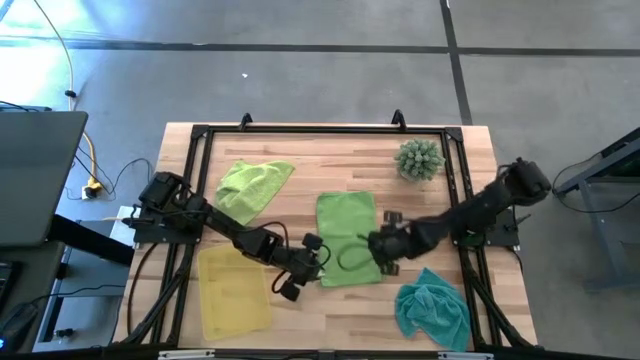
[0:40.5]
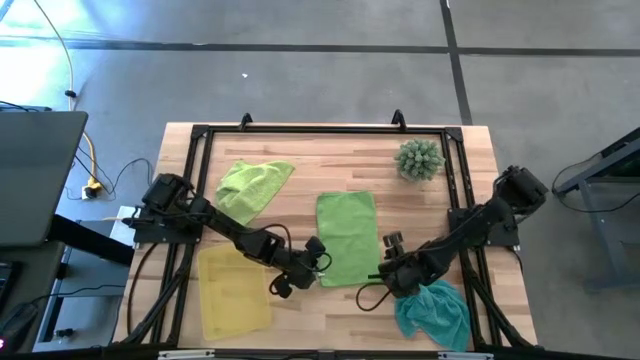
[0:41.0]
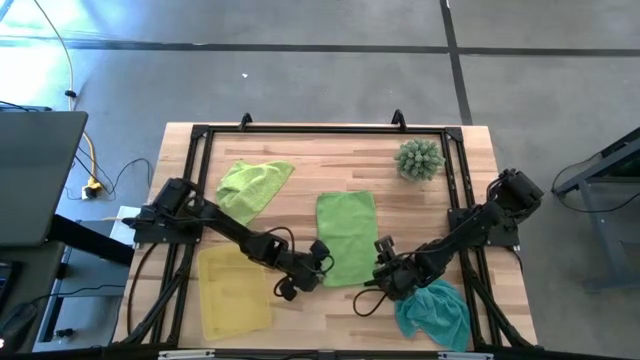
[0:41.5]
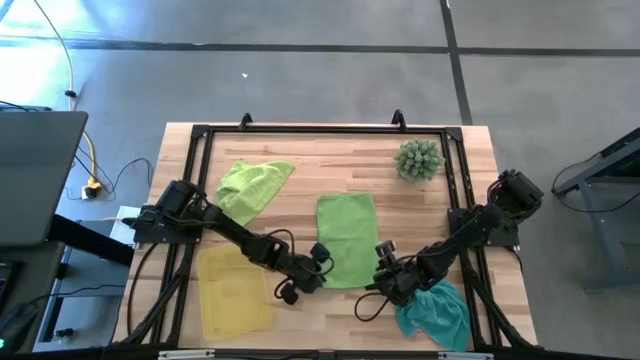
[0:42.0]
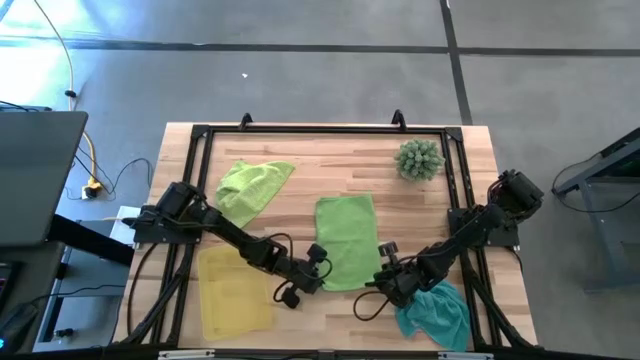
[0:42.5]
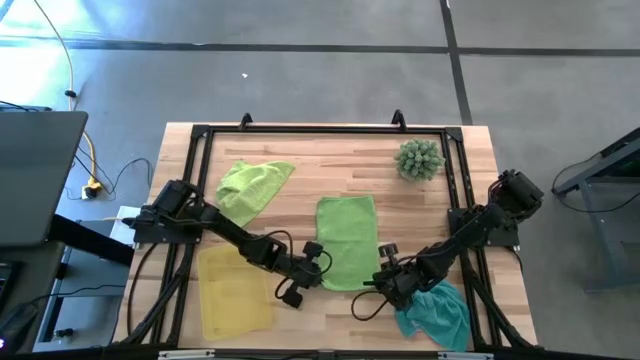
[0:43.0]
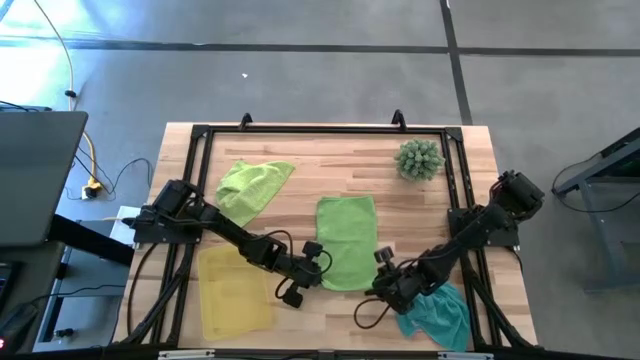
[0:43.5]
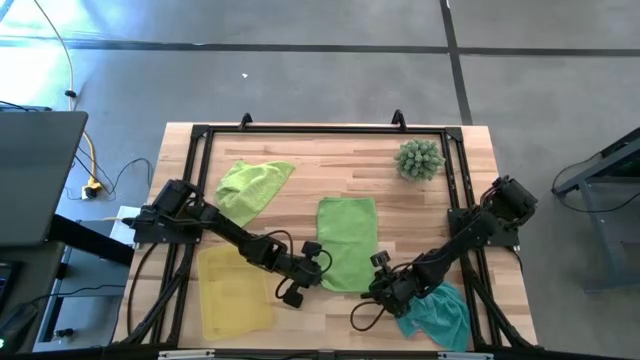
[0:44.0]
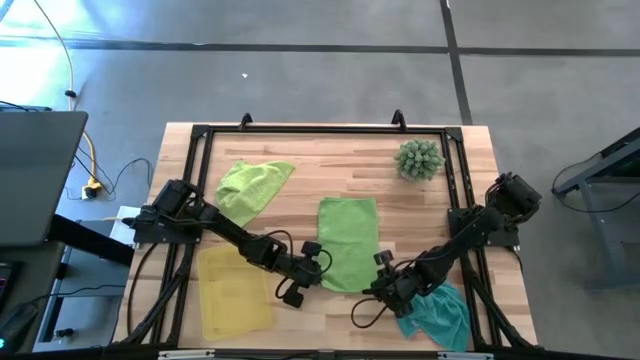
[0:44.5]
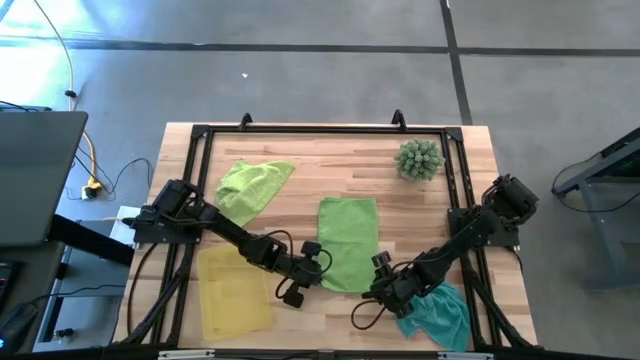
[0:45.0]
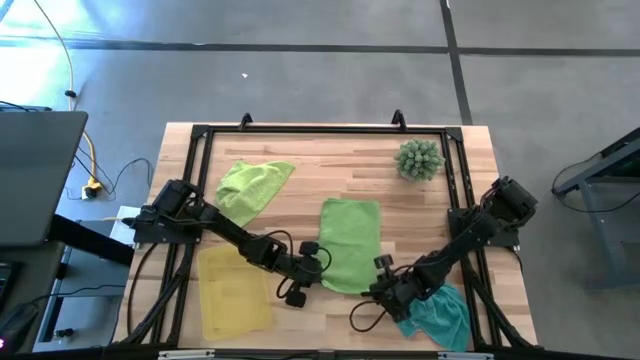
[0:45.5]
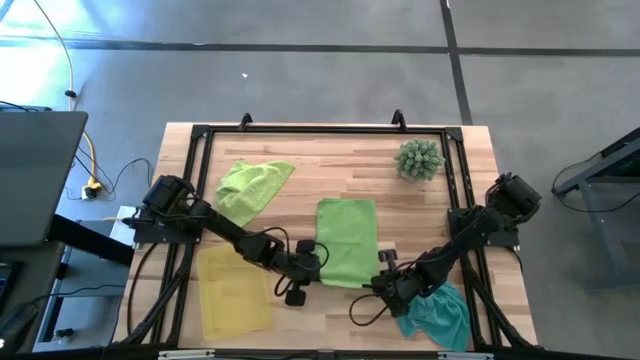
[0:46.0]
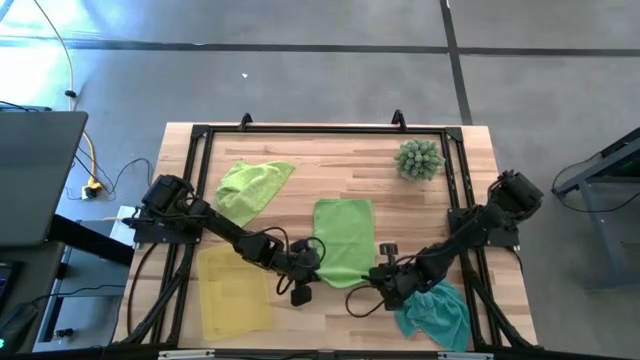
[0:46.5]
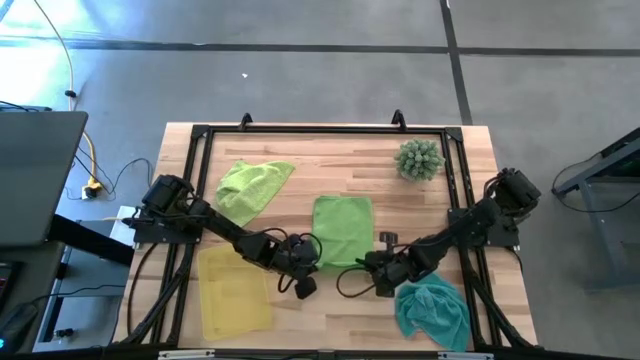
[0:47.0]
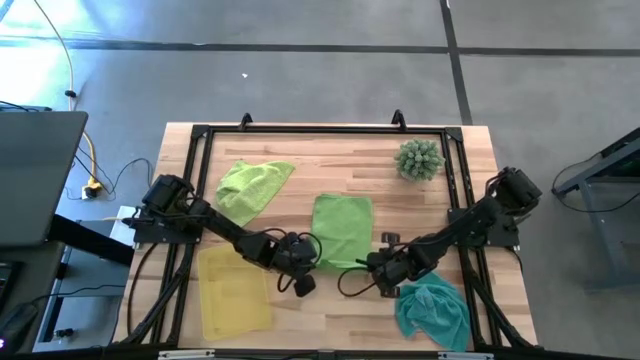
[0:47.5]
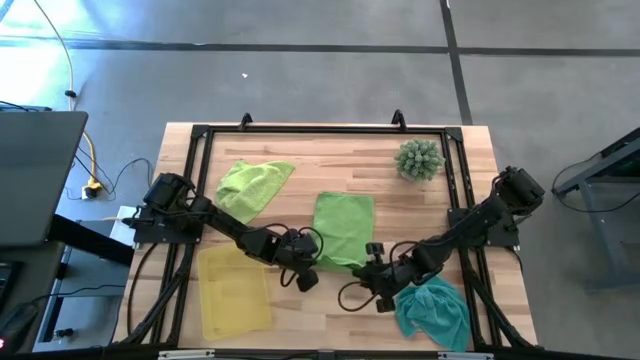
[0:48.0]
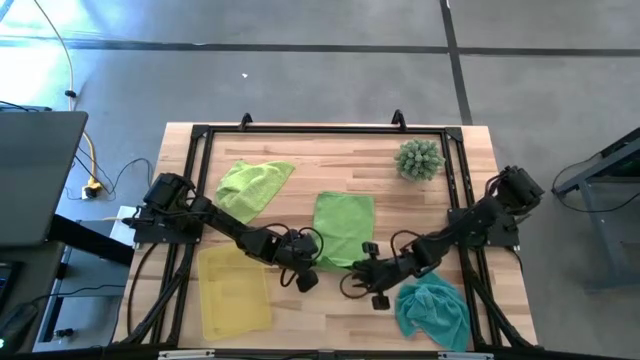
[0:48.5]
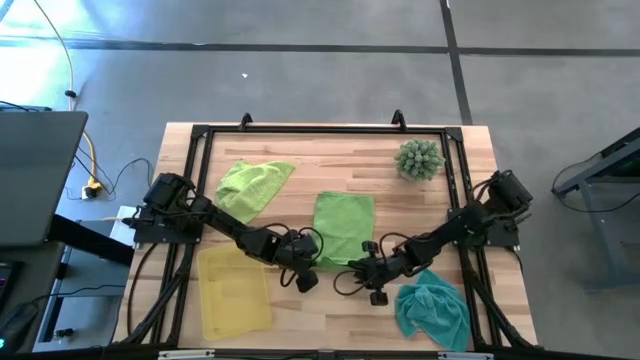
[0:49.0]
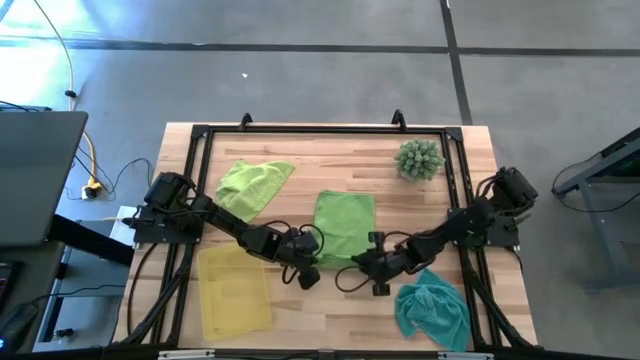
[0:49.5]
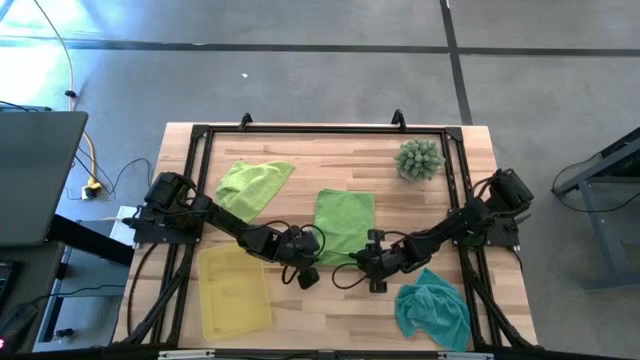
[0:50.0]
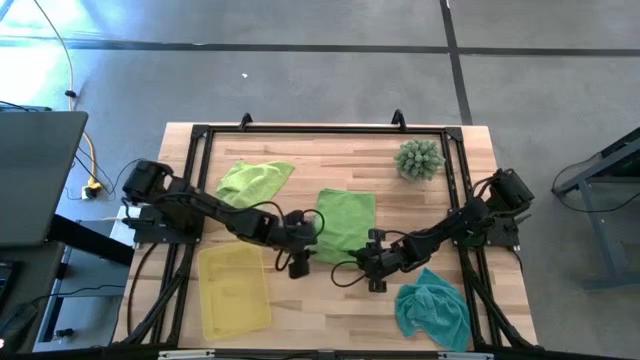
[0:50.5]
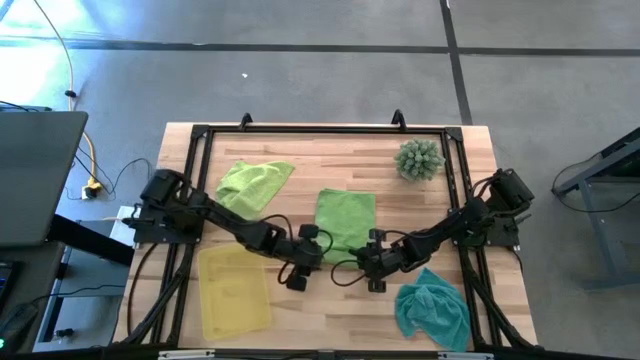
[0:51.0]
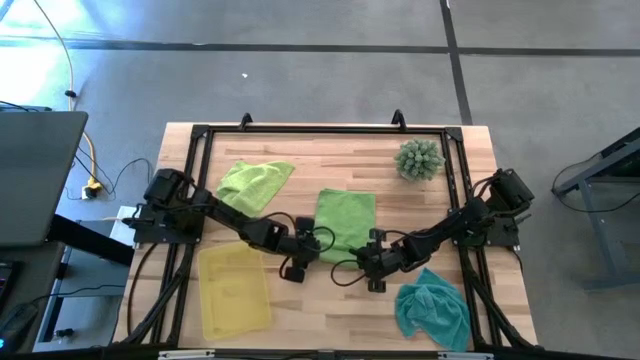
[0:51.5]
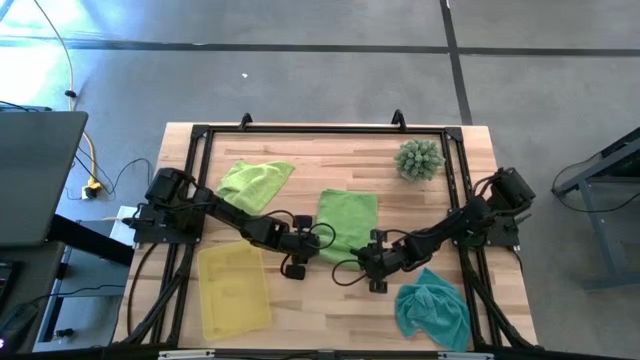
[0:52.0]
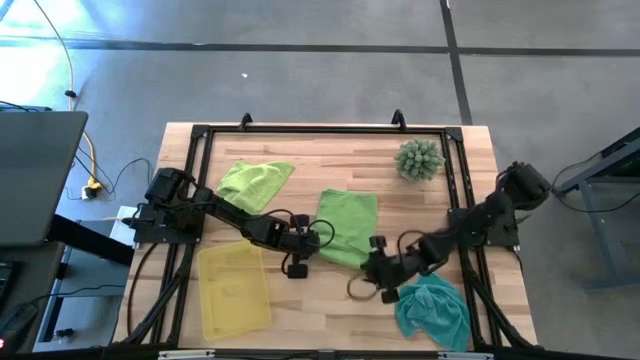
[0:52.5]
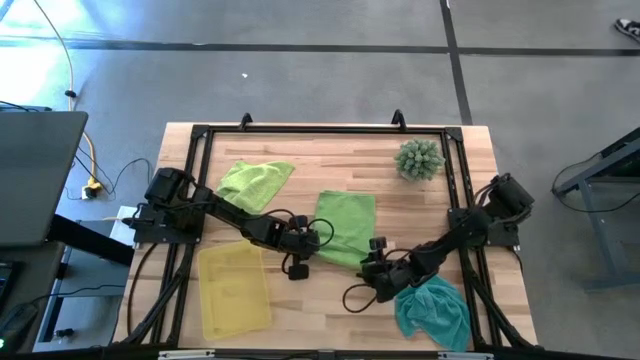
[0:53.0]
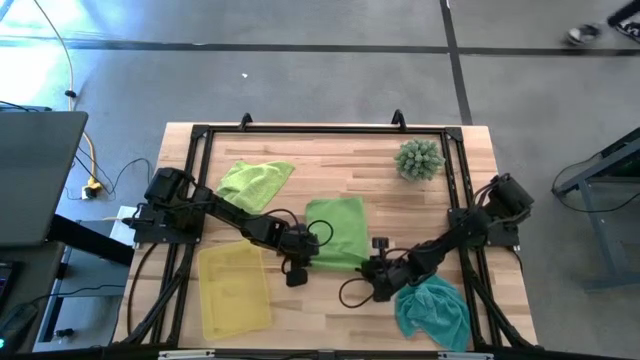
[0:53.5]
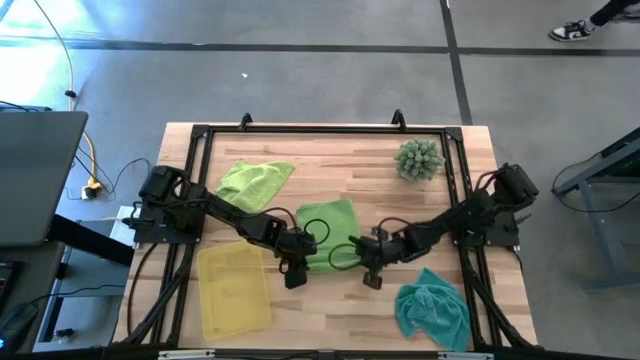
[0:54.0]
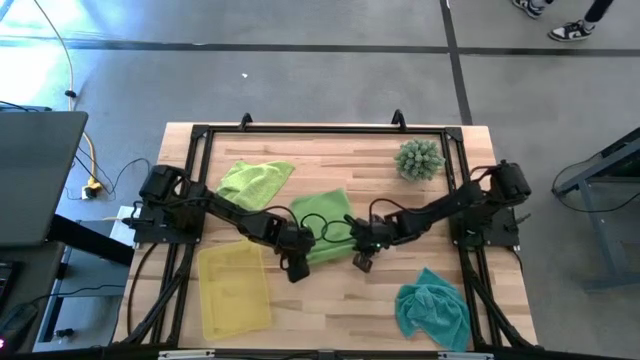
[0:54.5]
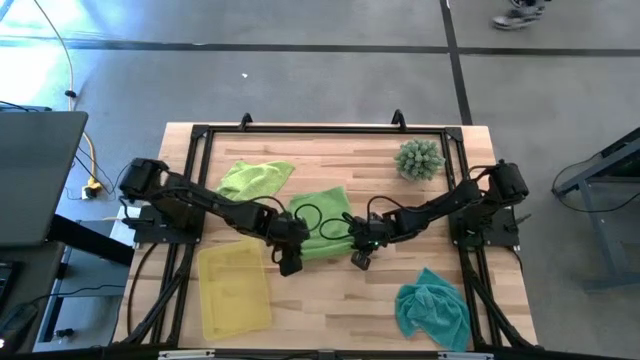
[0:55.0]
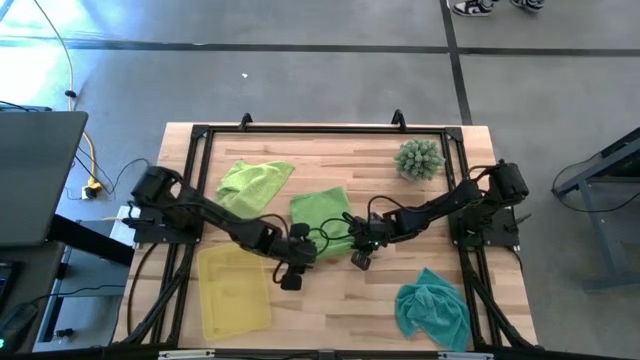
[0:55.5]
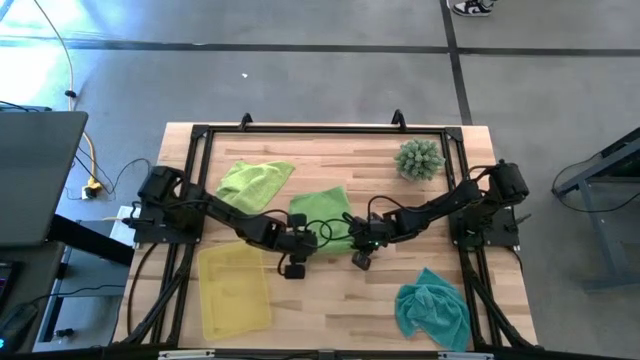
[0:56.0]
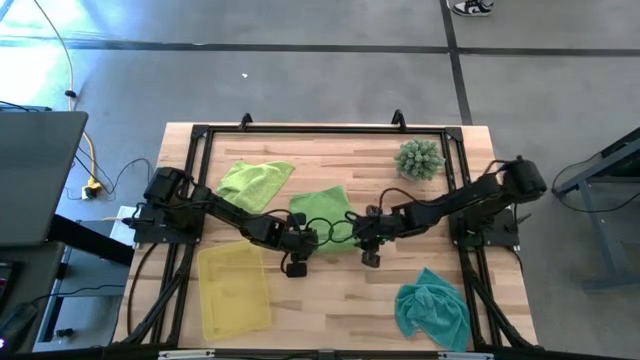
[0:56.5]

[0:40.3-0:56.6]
Task: Roll microfiber towels into tight, uniform cylinder then place into a basket
Roll the green microfiber towel

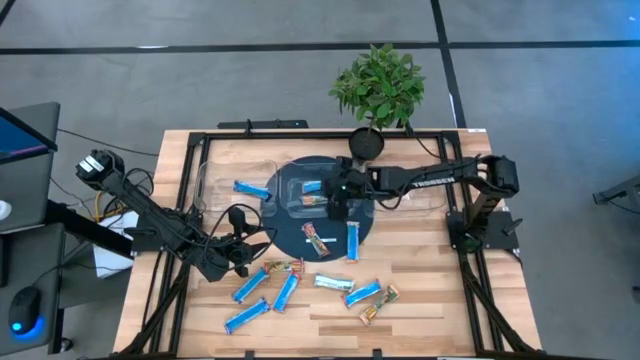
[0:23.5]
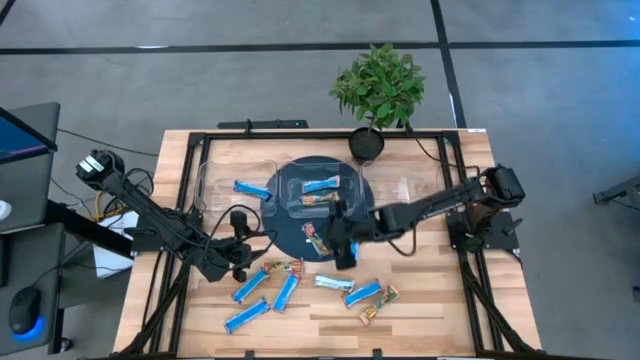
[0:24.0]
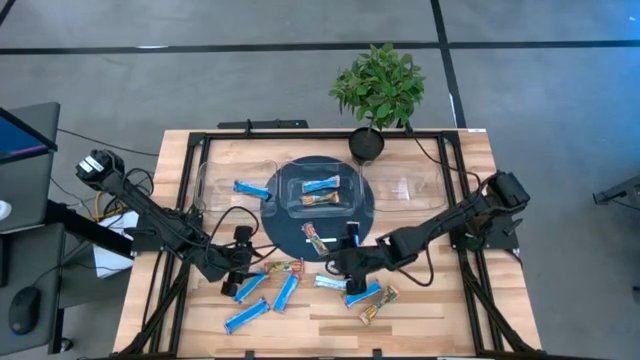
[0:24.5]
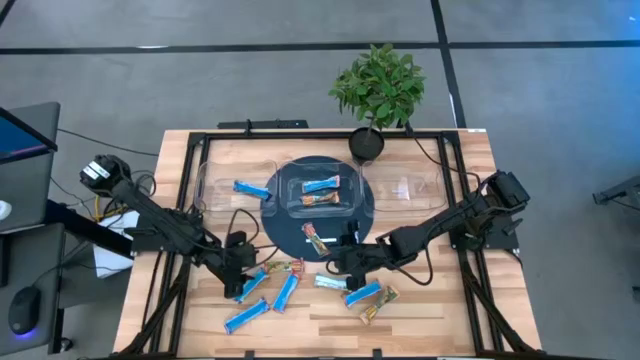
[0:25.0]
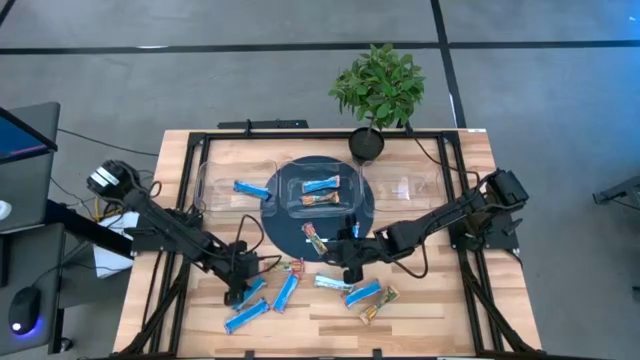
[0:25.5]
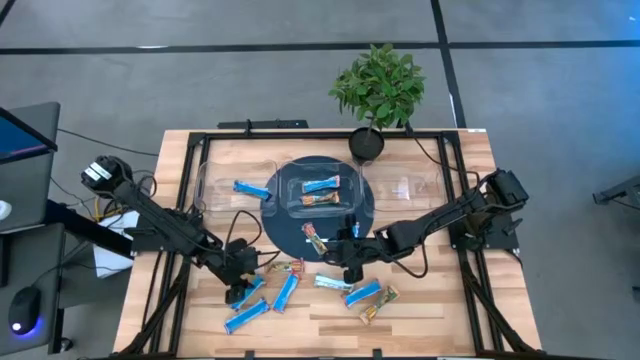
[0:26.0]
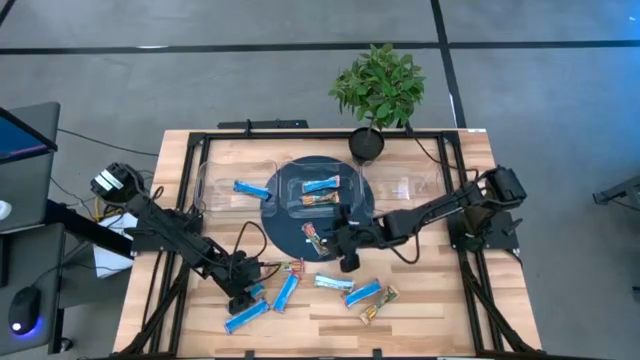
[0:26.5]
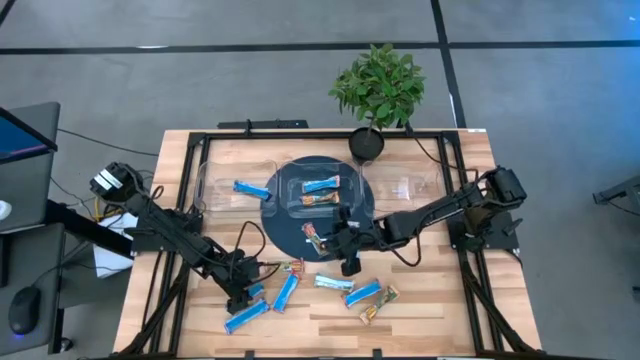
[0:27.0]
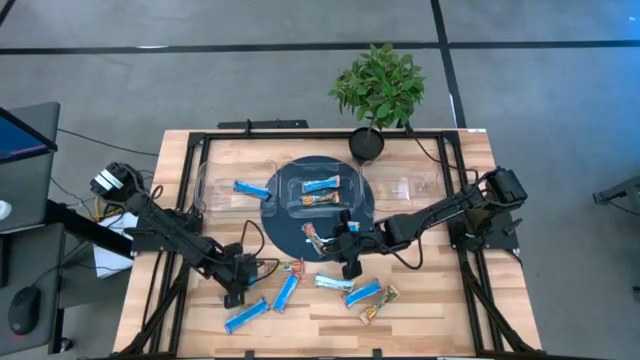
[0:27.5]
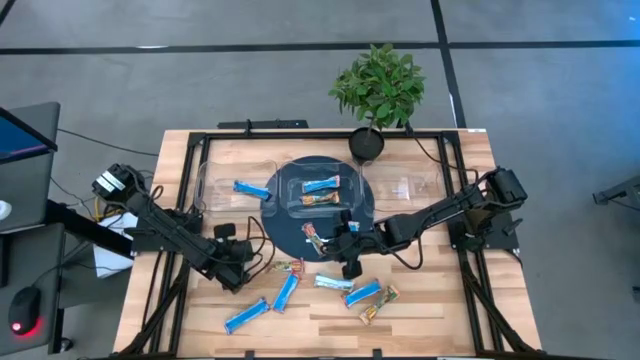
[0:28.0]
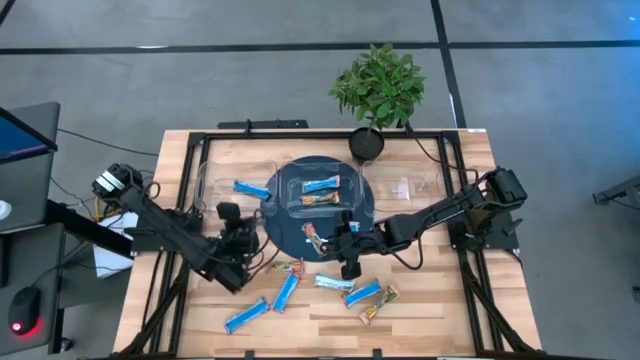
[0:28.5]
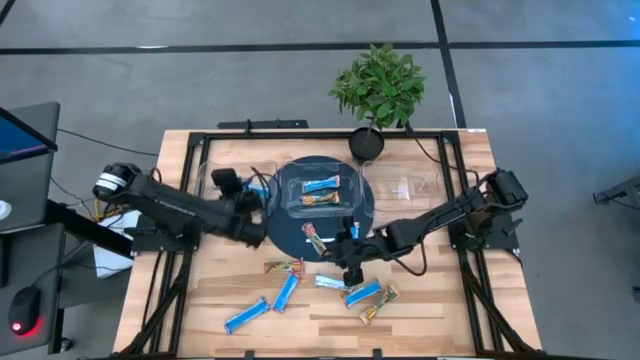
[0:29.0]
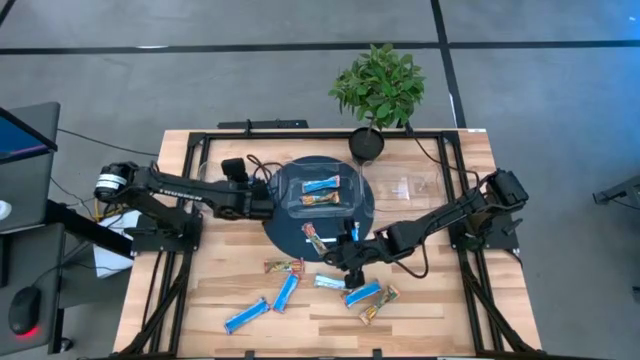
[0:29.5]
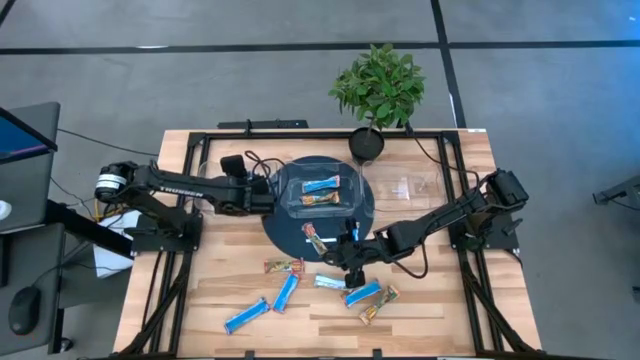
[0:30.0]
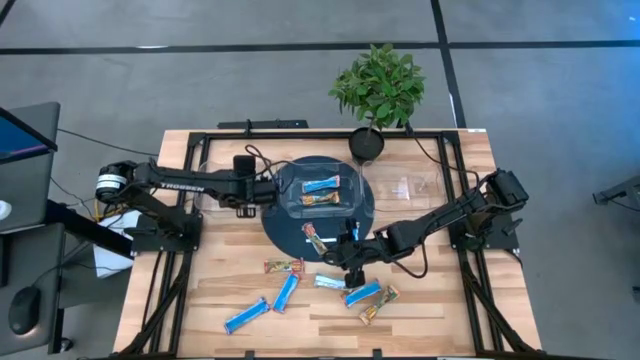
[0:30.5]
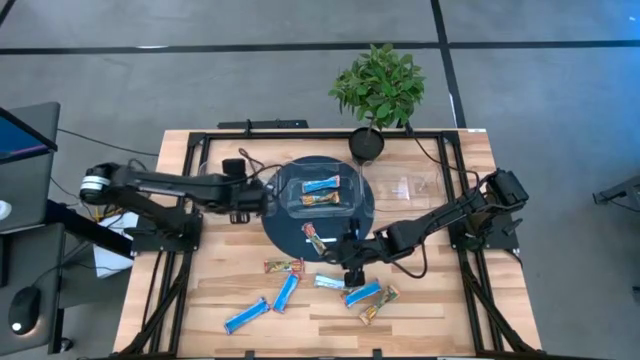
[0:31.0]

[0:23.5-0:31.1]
Task: Pick and place Granola Bars by type
Put the middle left blue snack bar into the left transparent bin
